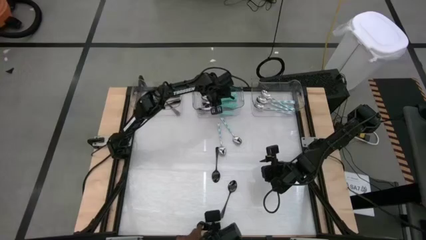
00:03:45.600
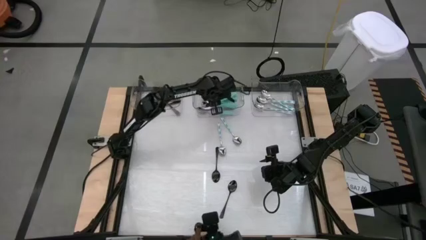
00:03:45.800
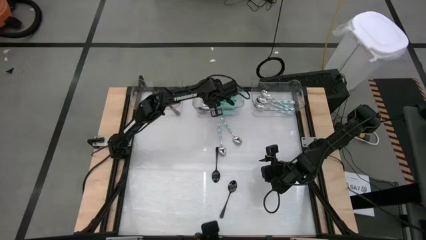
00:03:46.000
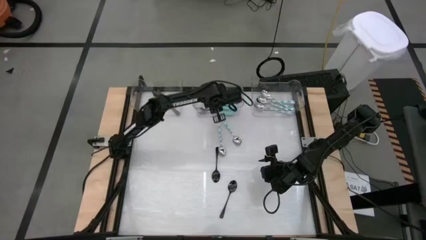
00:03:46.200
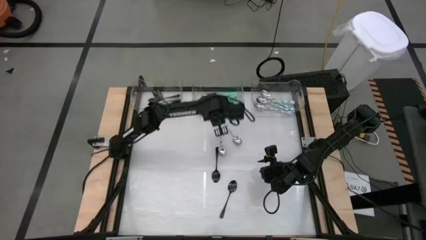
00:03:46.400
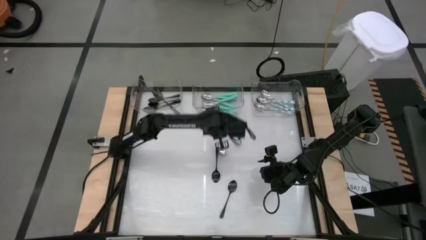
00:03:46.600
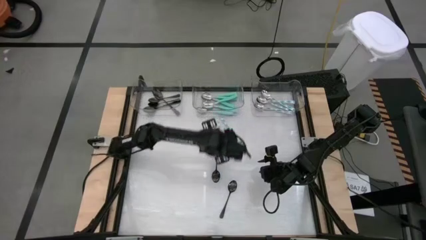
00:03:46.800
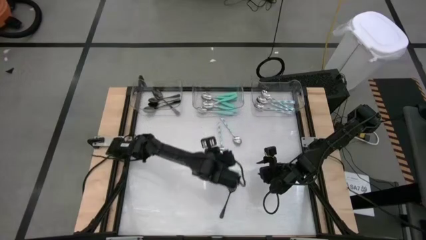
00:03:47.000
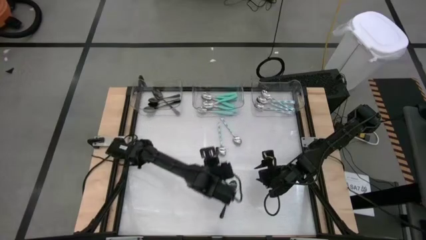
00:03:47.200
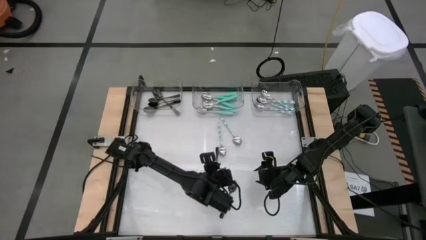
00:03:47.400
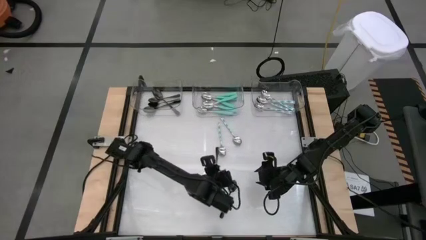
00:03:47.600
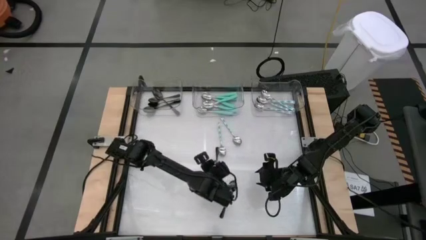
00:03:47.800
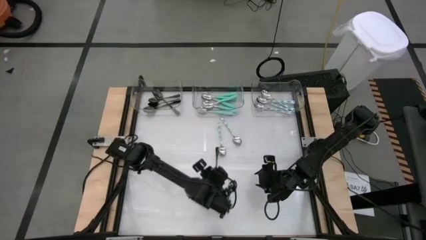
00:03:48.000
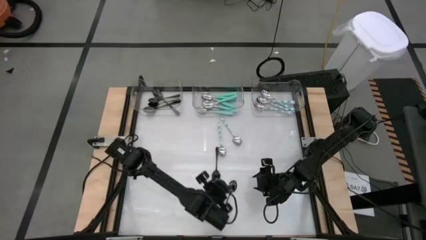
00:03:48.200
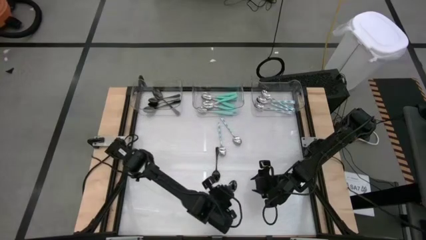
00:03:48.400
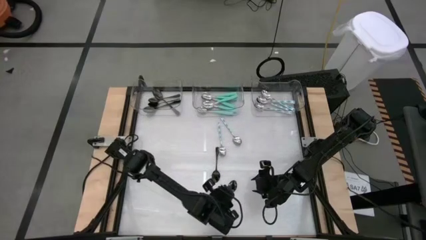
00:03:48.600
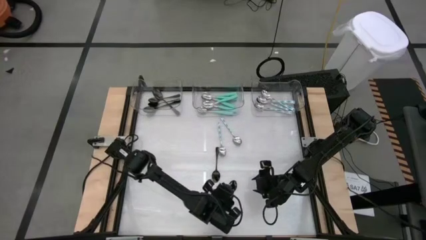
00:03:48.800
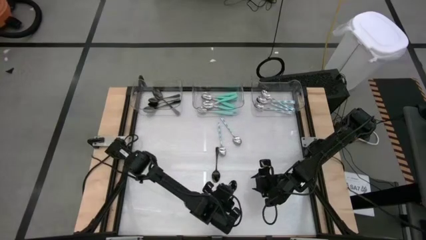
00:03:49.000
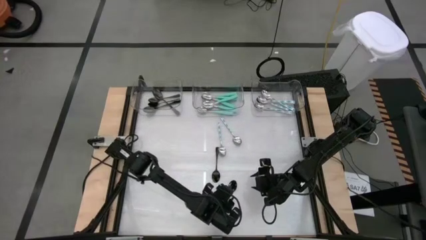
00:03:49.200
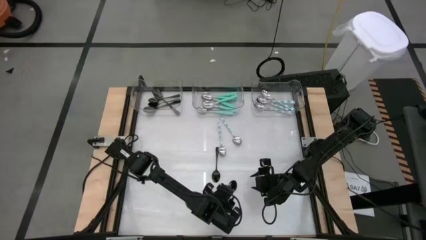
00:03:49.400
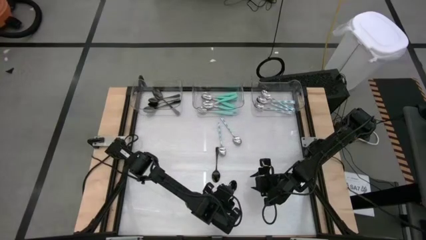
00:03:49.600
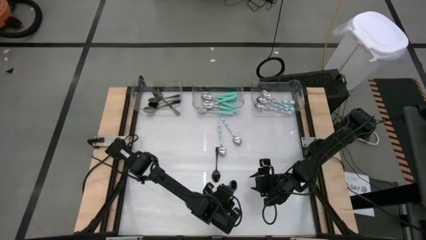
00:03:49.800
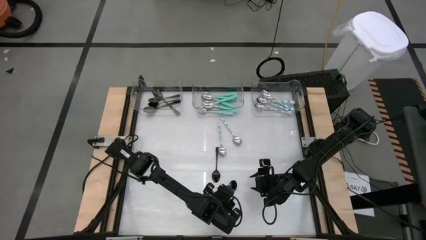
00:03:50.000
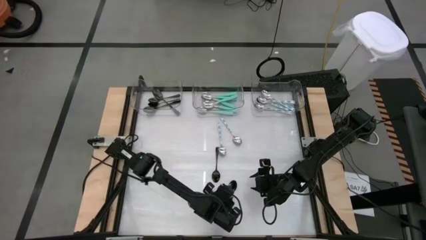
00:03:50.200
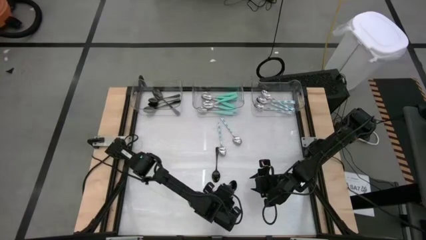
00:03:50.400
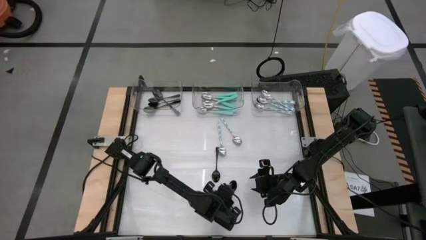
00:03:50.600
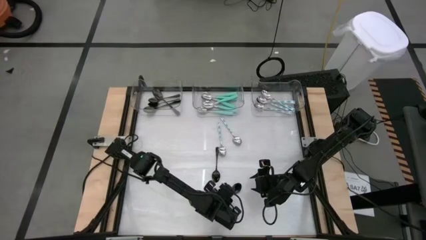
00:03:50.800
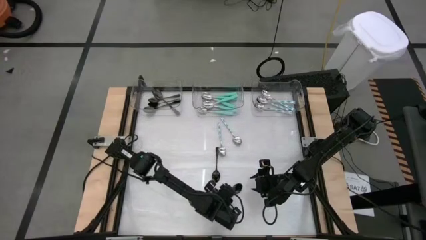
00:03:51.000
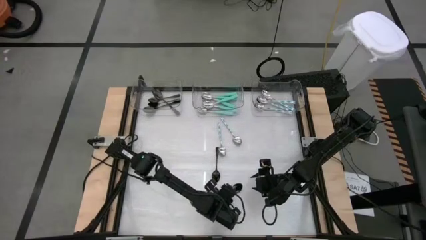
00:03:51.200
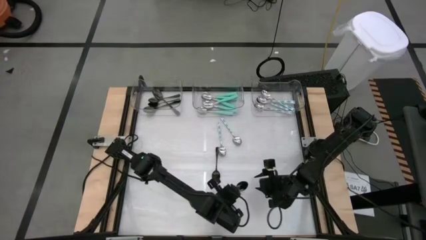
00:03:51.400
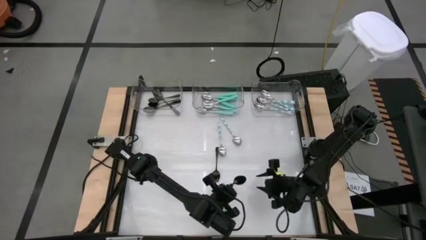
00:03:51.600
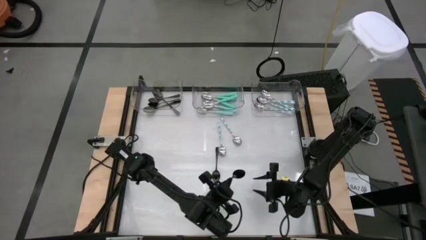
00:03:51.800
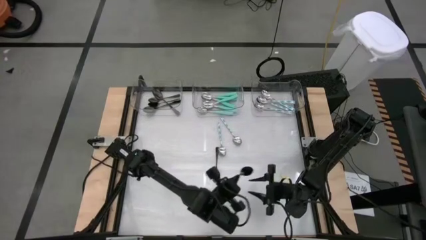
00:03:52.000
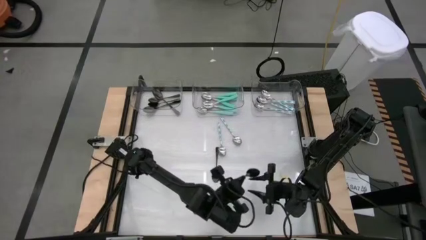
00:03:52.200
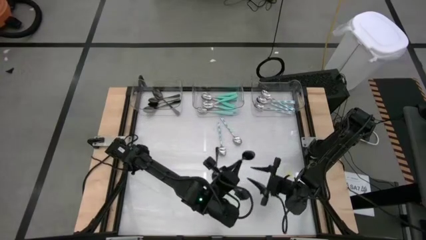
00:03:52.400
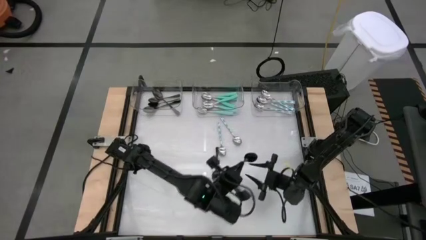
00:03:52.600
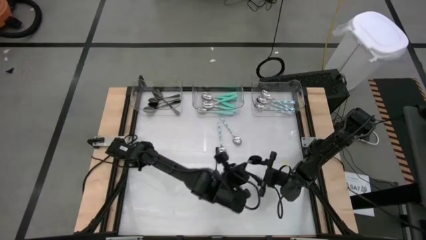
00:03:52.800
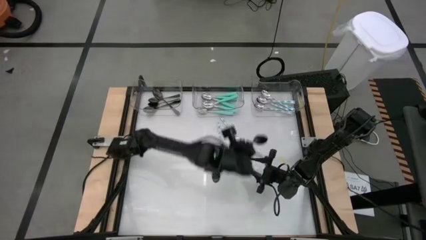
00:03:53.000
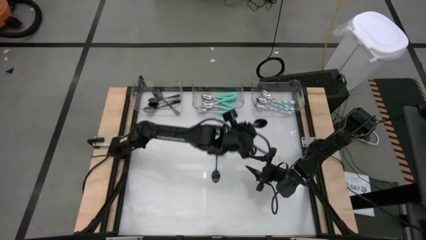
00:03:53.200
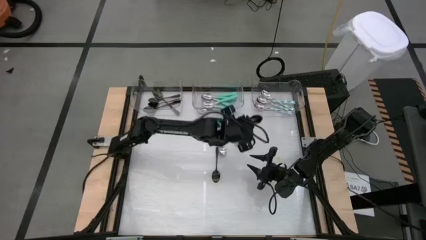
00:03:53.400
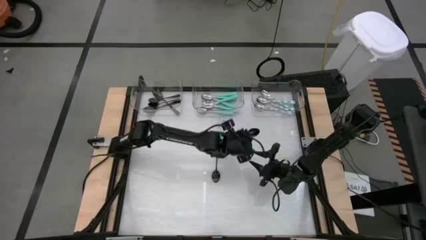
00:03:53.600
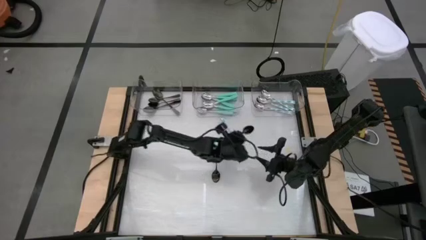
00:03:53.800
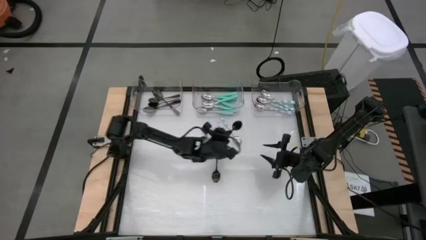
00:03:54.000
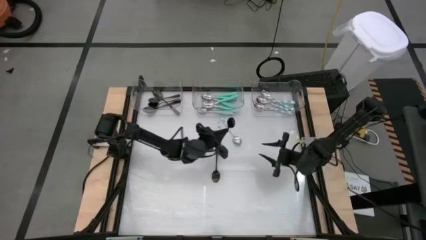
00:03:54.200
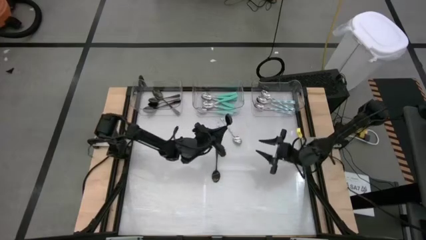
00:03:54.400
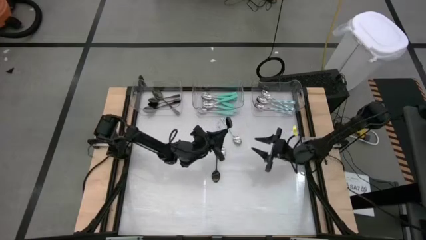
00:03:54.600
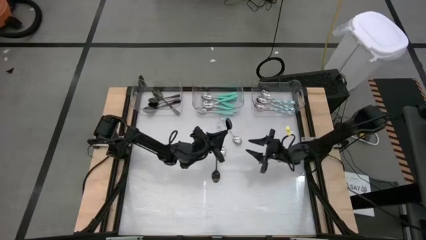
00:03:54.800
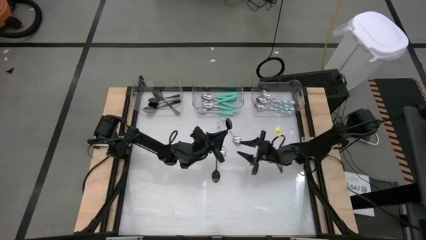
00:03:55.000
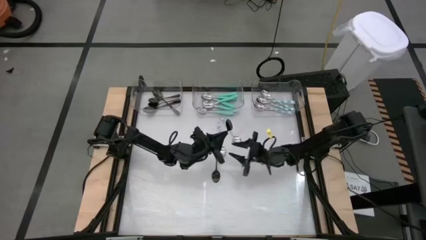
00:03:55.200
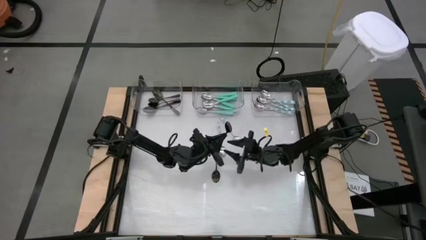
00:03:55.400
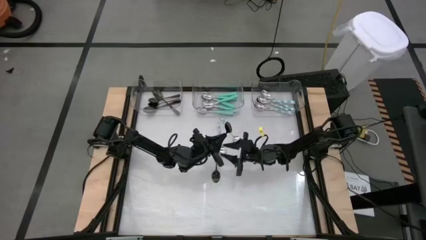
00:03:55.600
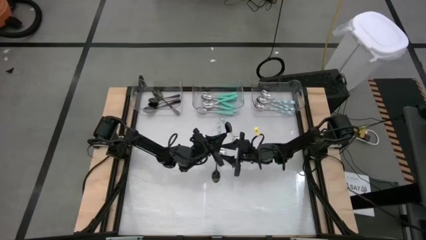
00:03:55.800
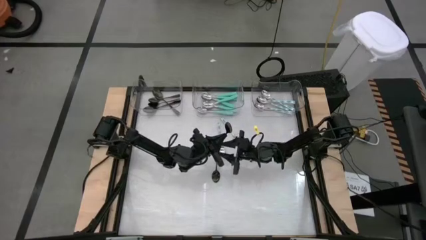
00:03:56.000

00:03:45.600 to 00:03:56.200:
Task: Sort silverware by color (type)
Put the black spoon into the left transparent bin

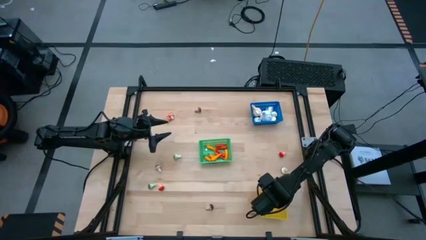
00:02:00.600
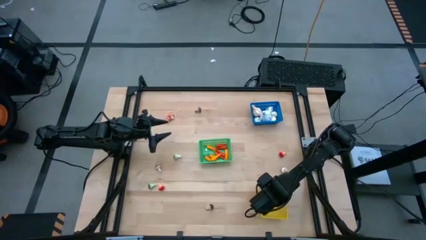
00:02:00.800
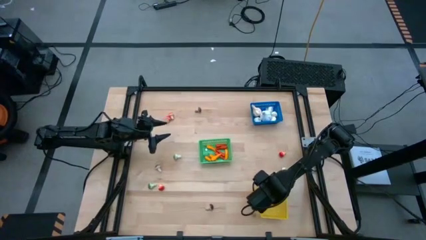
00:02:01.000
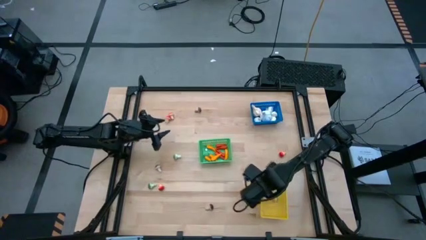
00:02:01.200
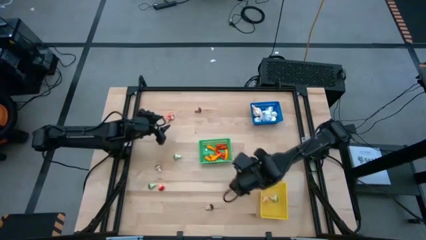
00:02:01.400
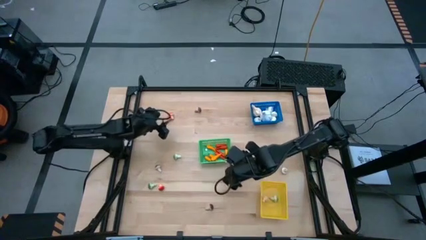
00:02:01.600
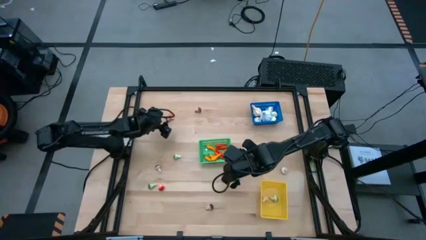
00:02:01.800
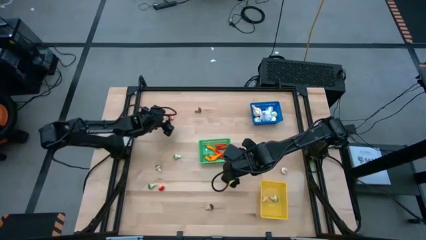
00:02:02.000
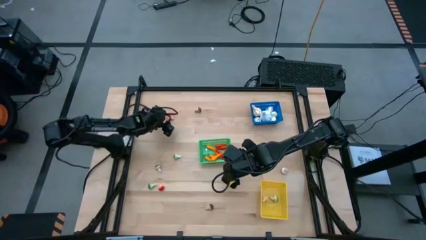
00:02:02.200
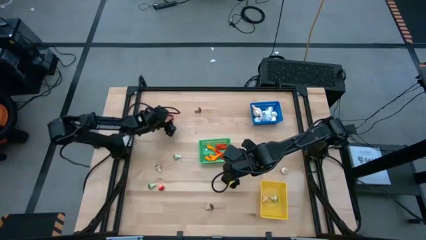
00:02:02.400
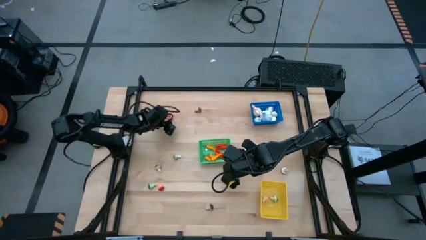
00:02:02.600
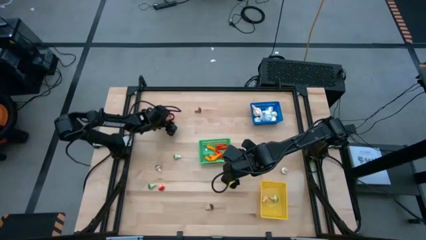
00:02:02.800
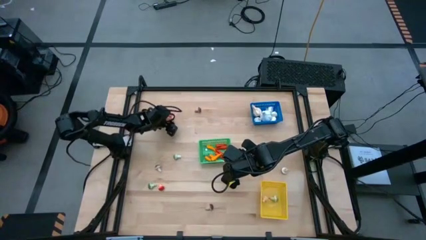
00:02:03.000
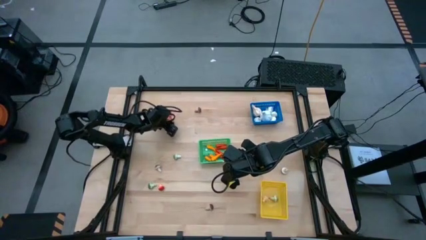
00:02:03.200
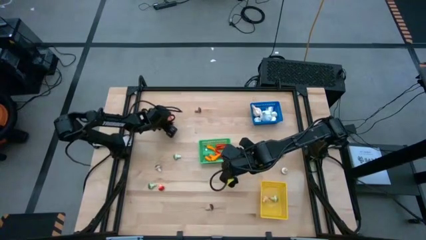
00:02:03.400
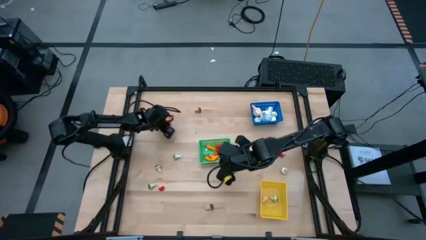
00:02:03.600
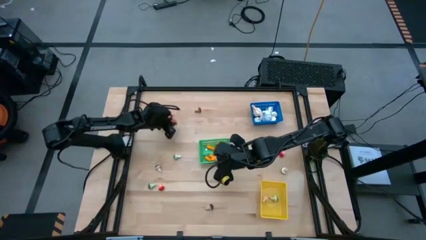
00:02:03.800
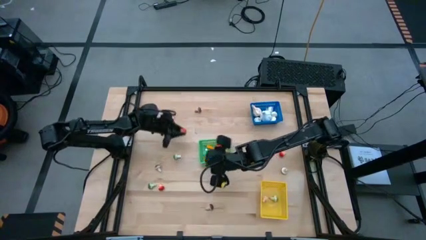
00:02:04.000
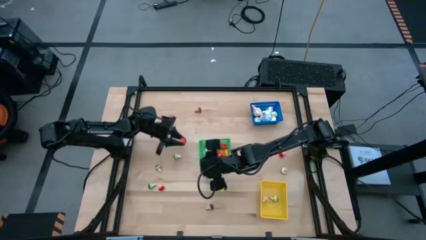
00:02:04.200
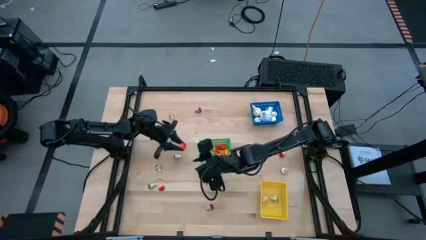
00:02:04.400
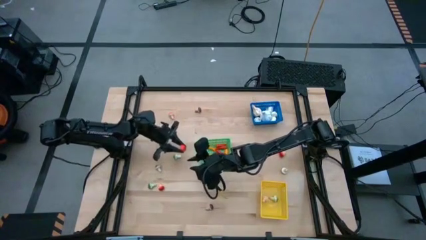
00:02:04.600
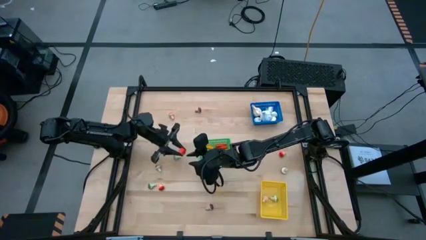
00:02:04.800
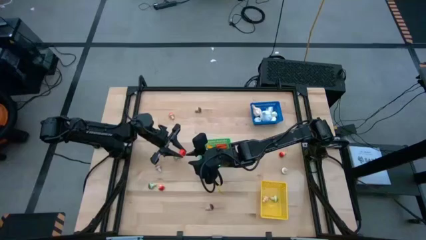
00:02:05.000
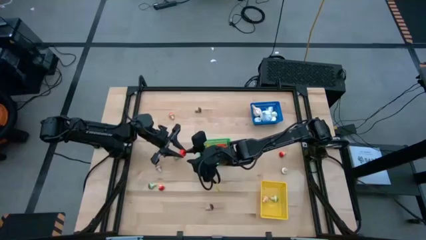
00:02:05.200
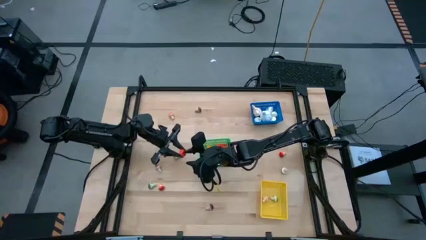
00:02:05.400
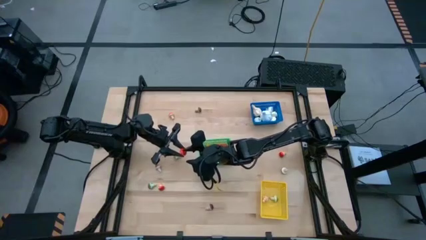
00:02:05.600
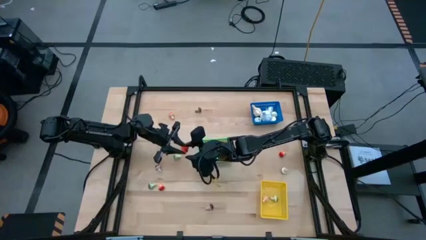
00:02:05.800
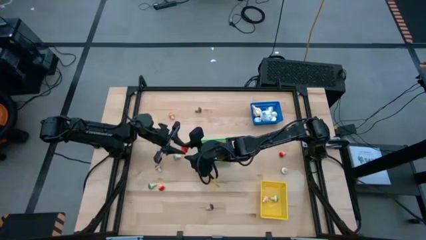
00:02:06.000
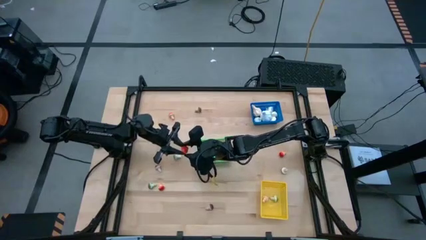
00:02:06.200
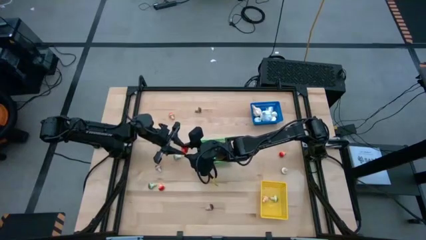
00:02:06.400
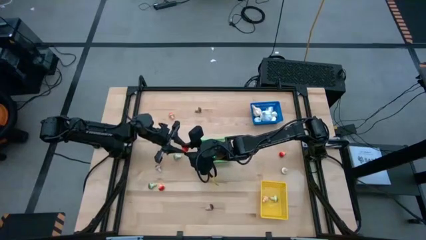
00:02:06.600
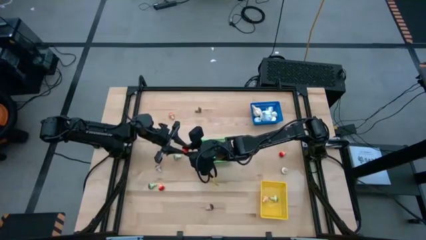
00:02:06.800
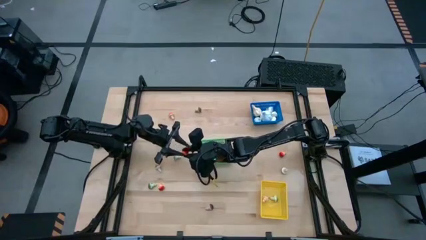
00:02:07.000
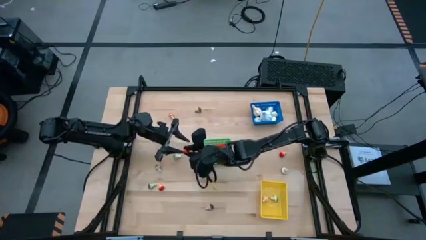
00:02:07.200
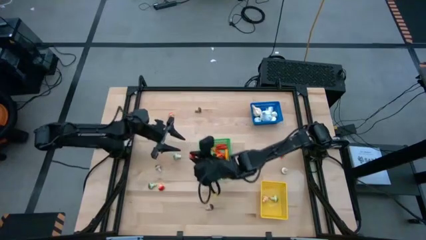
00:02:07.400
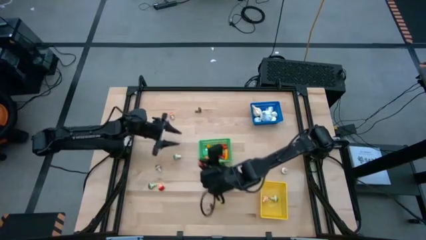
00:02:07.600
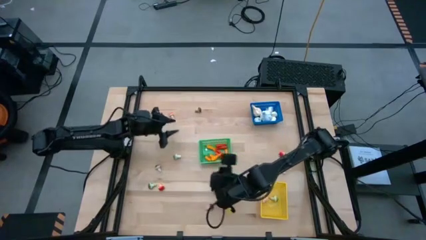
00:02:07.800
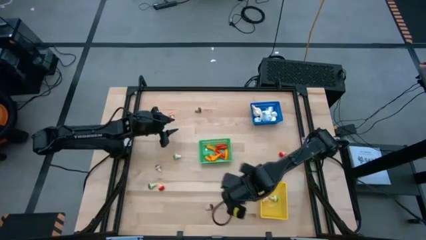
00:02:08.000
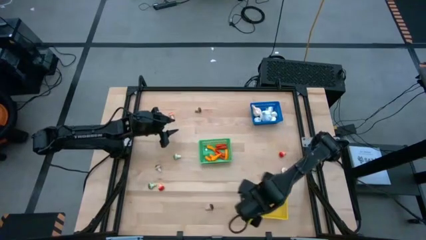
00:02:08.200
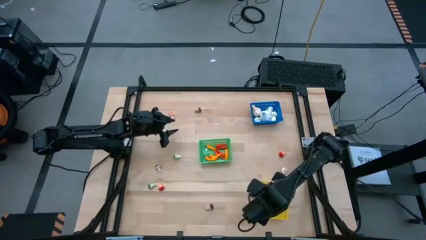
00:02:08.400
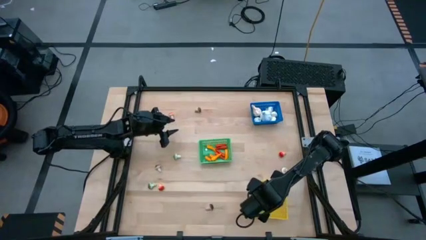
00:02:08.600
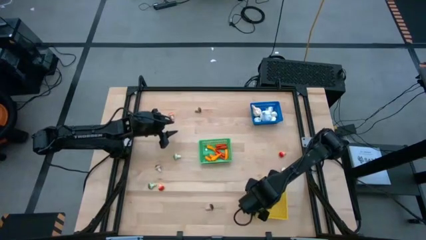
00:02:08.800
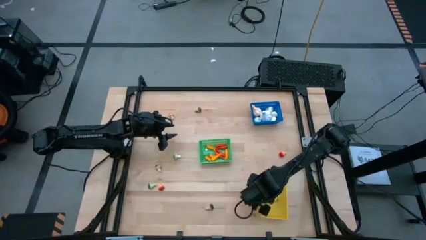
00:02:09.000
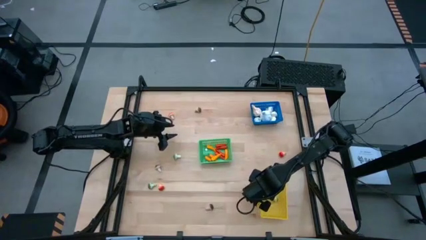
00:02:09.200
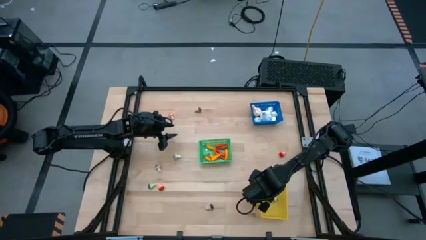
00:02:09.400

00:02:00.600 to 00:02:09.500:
Task: Sort produce into baskets
Put the orange mushroom into the yellow bin
